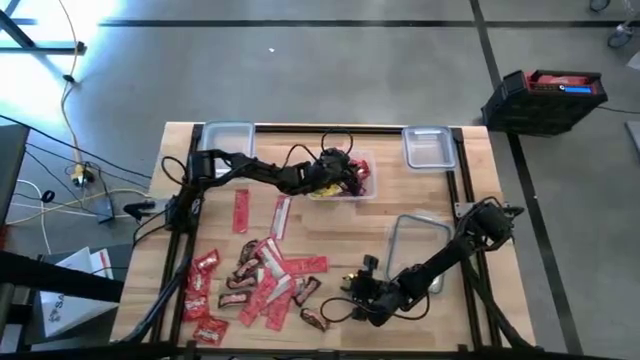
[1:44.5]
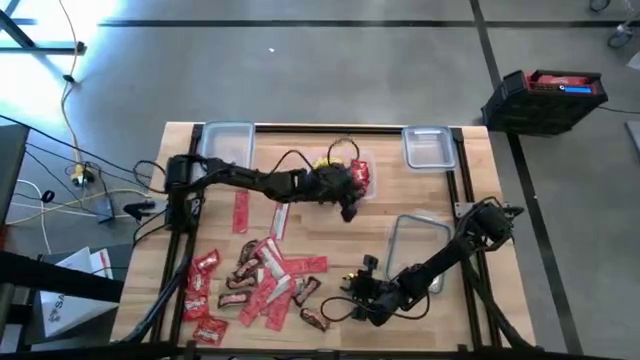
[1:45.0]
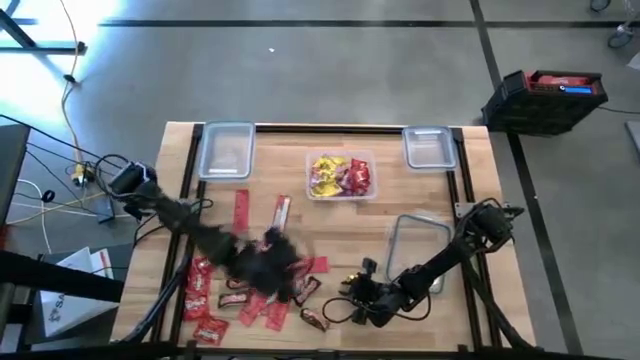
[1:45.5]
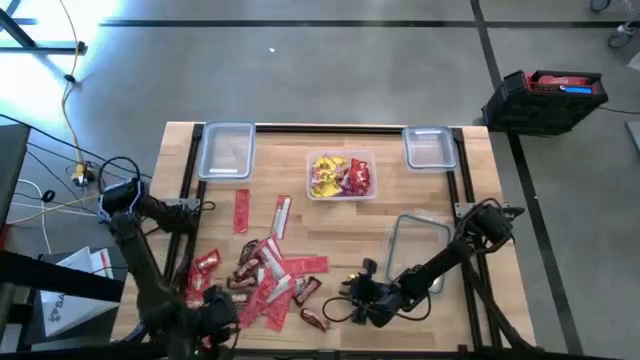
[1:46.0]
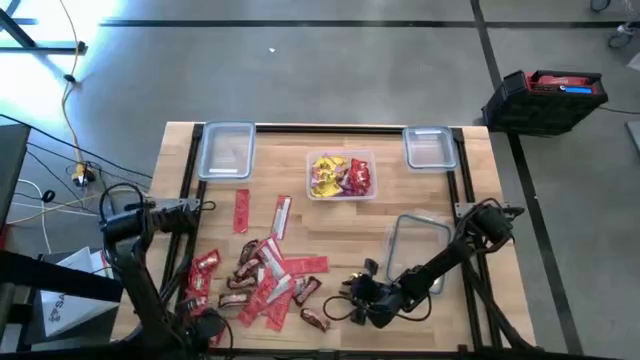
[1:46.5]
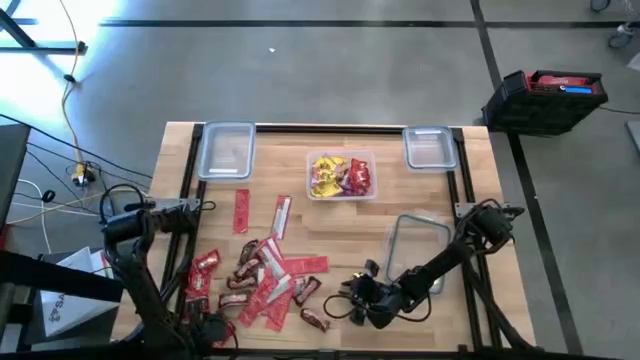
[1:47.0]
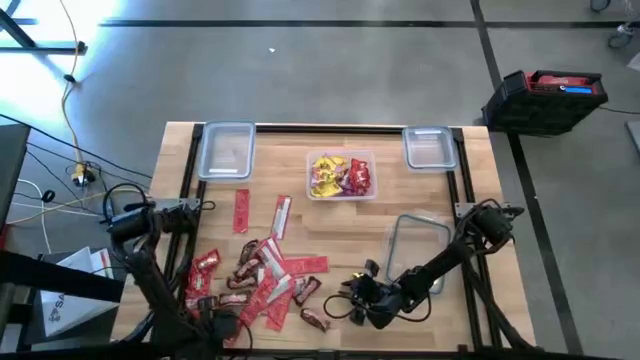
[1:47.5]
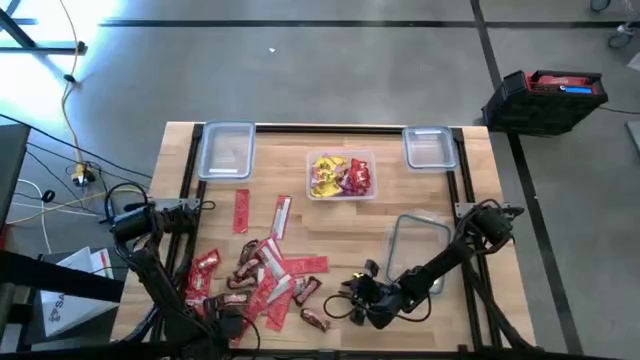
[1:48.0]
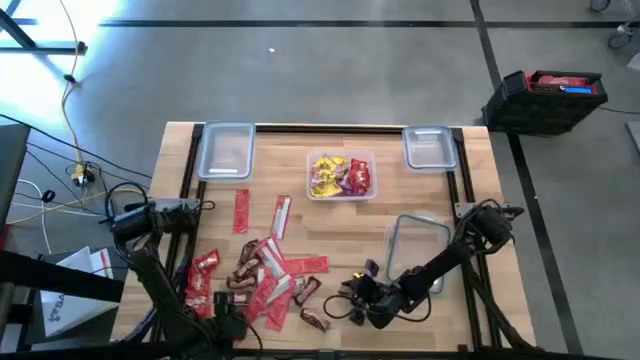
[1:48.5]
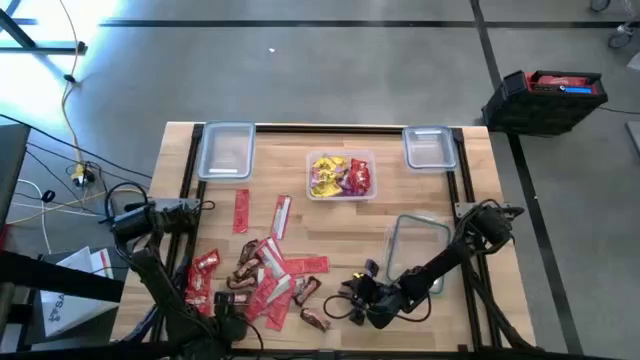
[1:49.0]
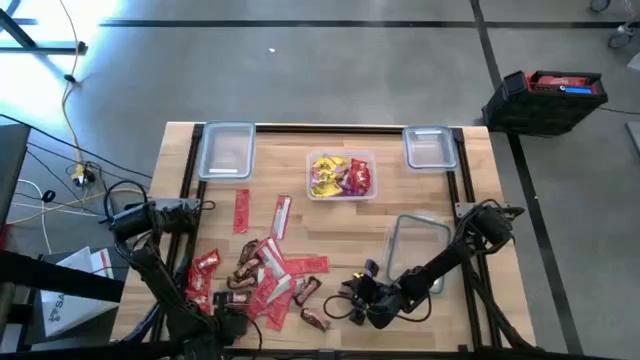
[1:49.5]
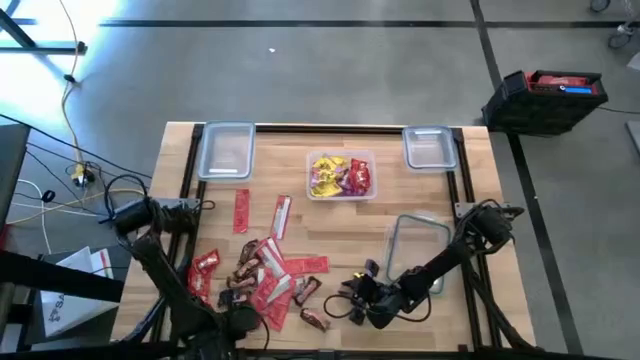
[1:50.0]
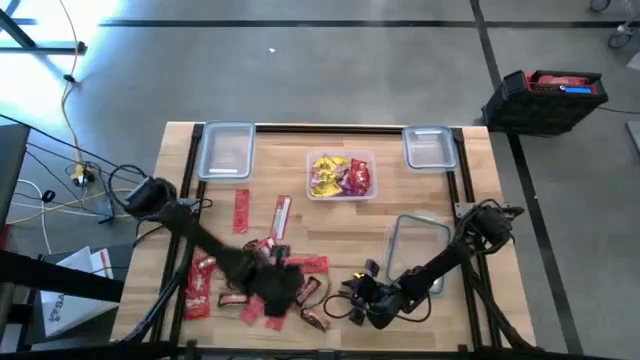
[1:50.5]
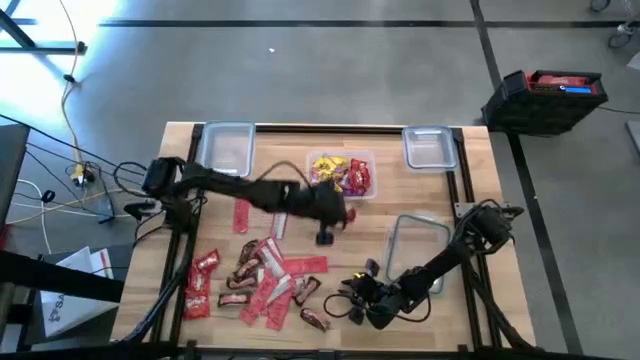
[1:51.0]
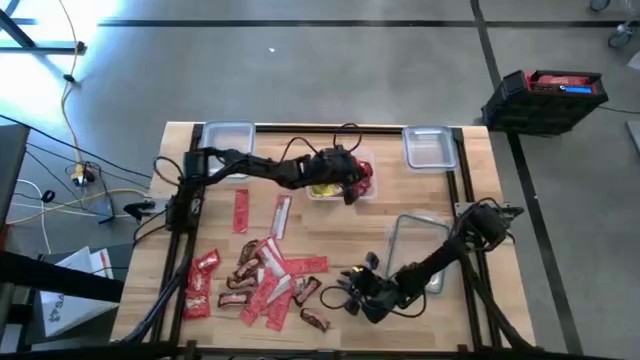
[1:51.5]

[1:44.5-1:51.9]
Task: Sort candy
Put the red candy into the center transparent bin

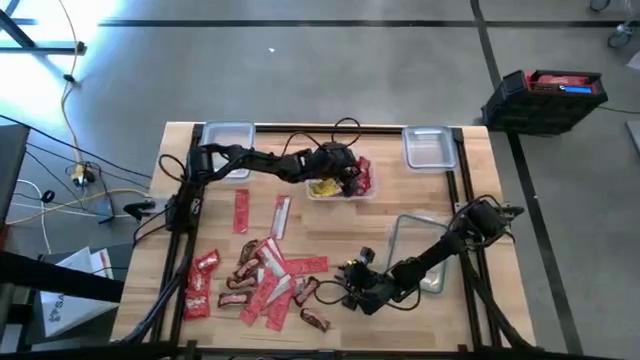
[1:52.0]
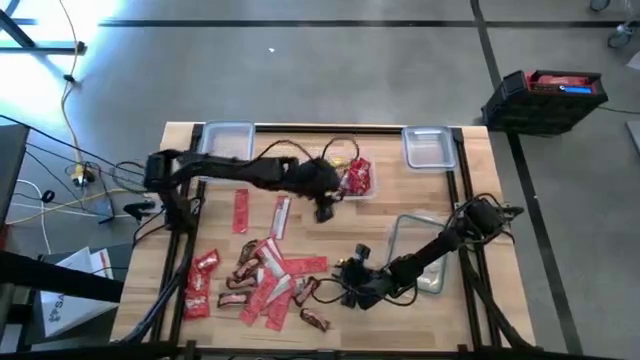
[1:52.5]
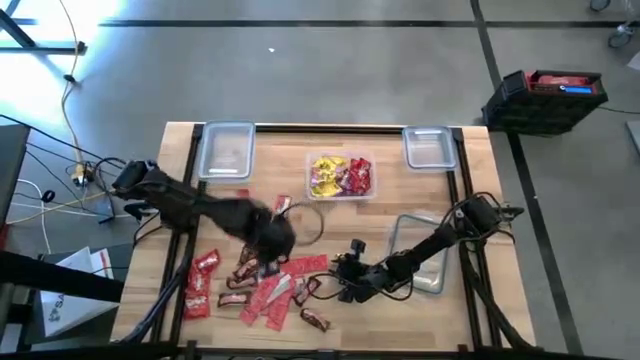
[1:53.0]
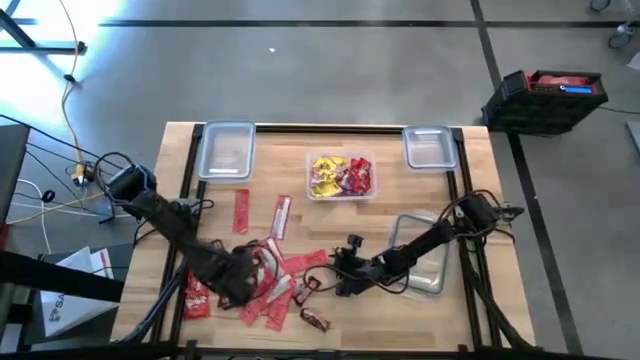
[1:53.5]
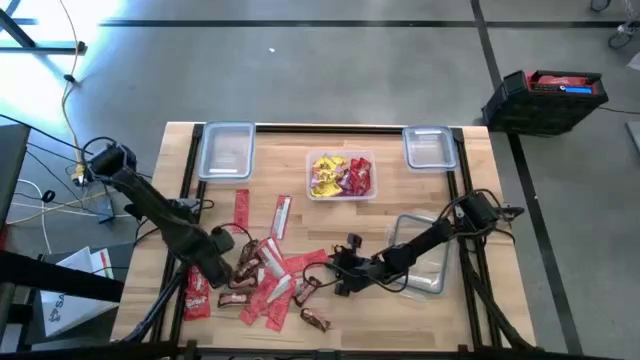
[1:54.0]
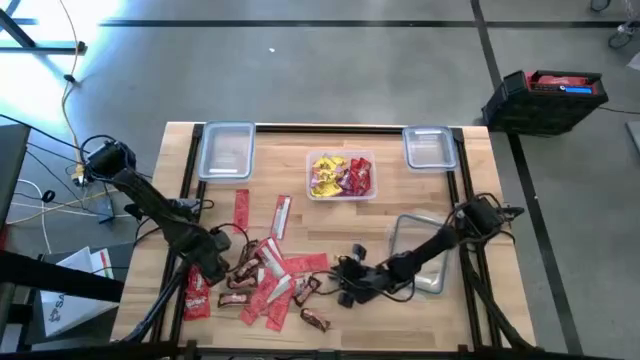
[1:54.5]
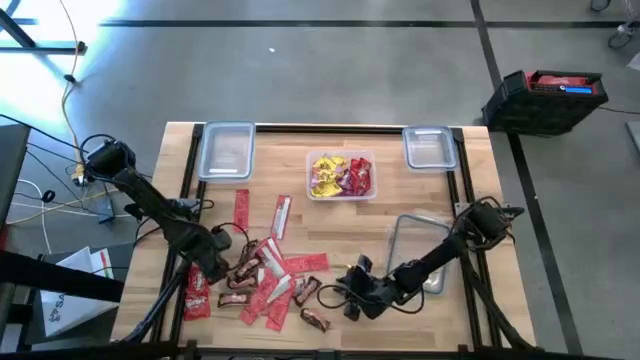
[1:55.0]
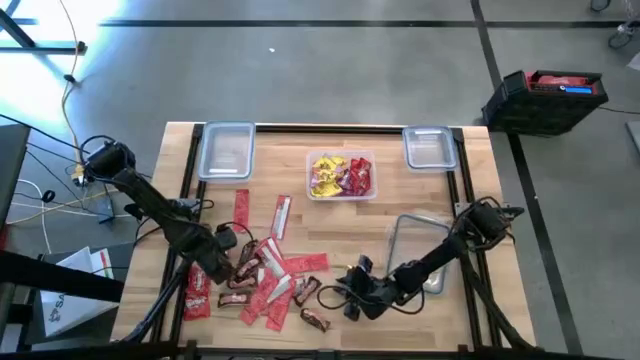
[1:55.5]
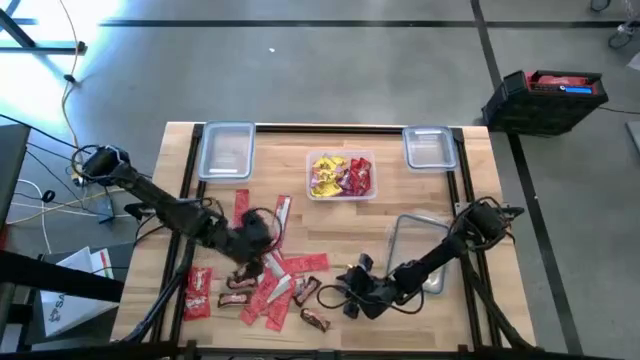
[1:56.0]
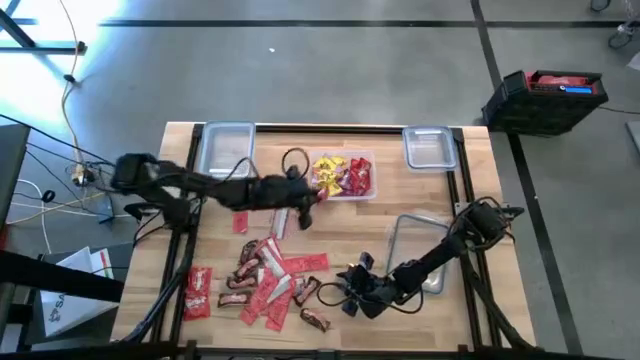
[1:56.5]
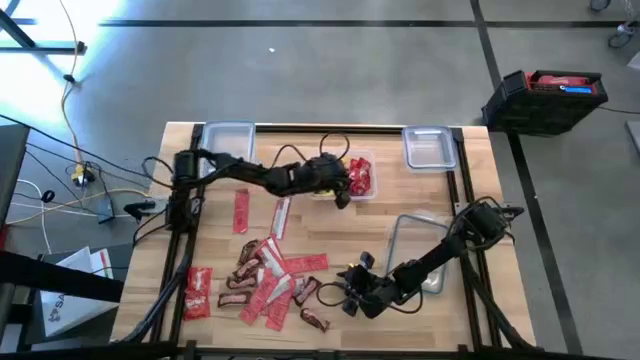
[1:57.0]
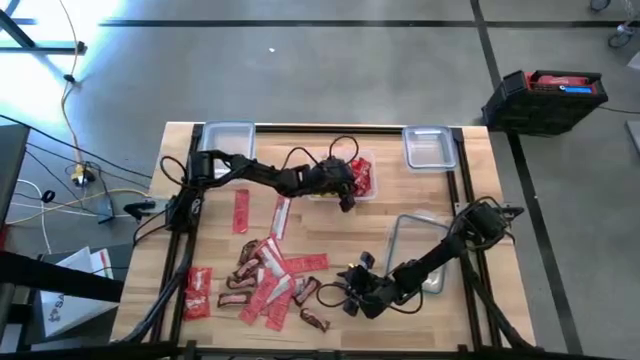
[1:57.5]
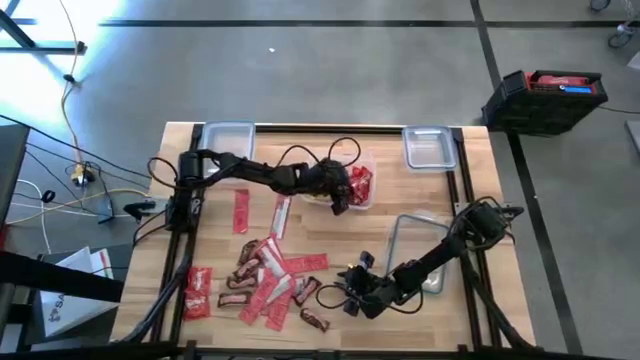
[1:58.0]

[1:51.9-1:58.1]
Put the red candy into the center transparent bin

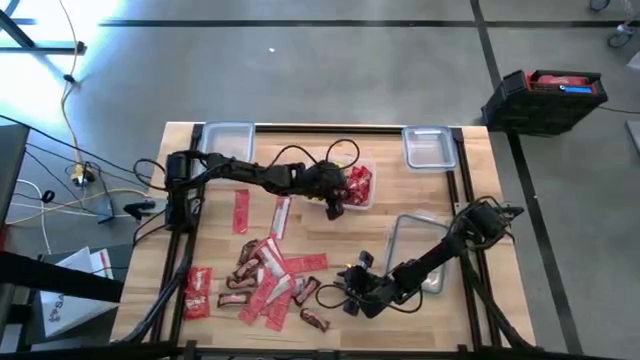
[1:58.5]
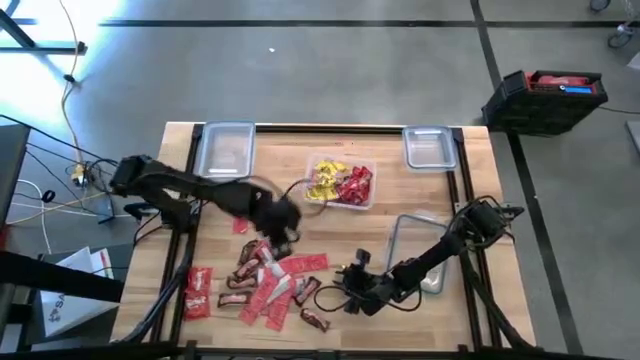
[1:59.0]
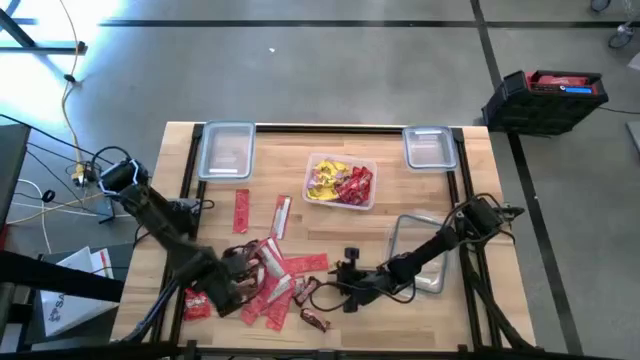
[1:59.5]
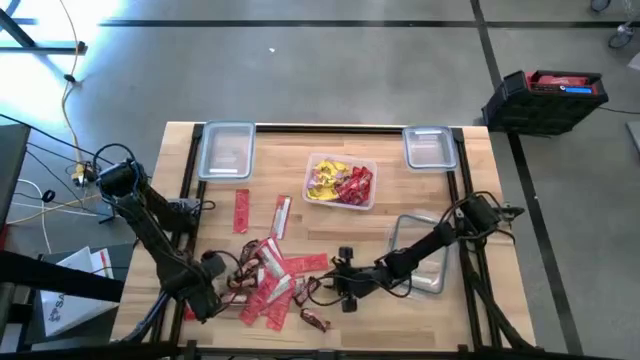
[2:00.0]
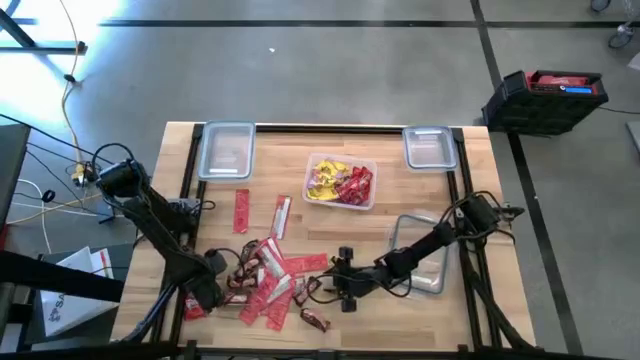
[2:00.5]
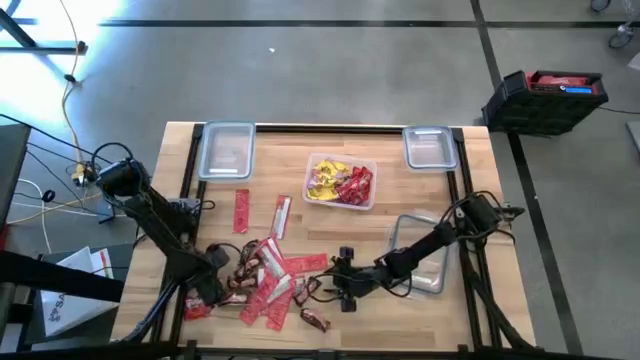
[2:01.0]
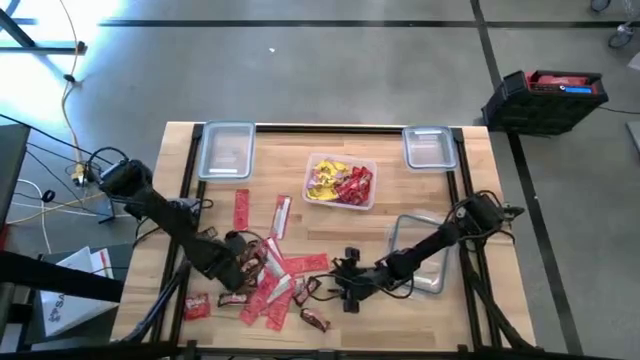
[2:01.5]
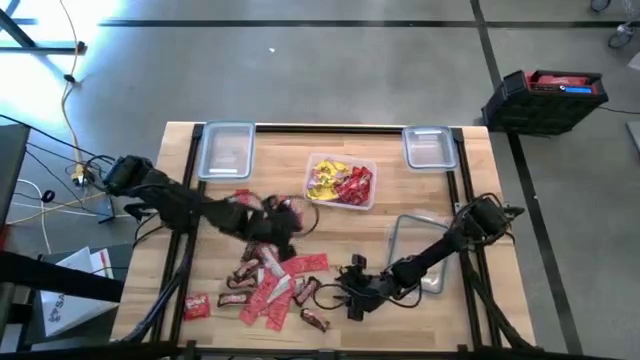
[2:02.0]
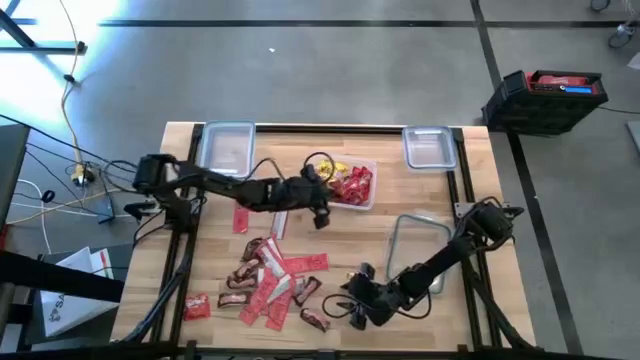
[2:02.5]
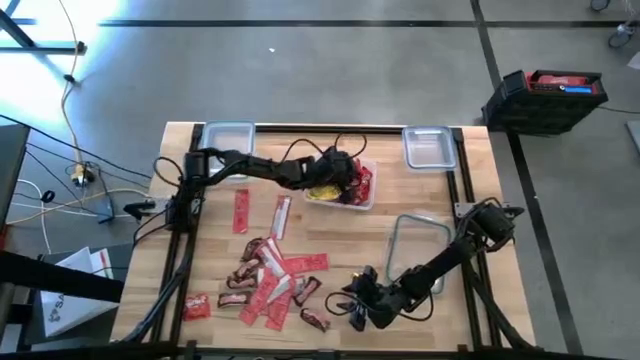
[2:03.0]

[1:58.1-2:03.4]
Put the red candy into the center transparent bin

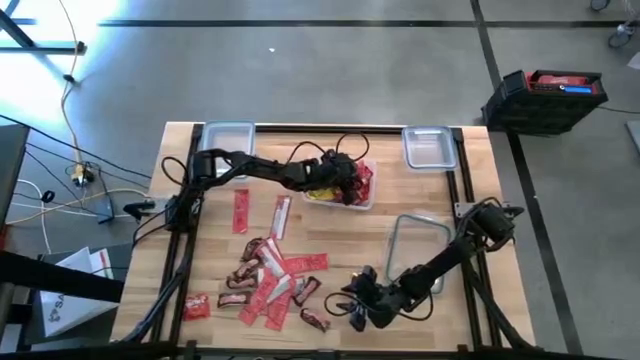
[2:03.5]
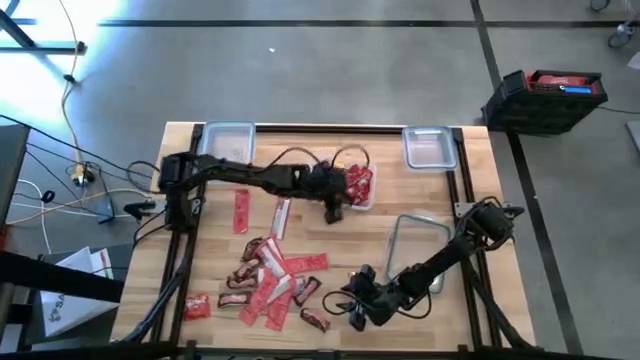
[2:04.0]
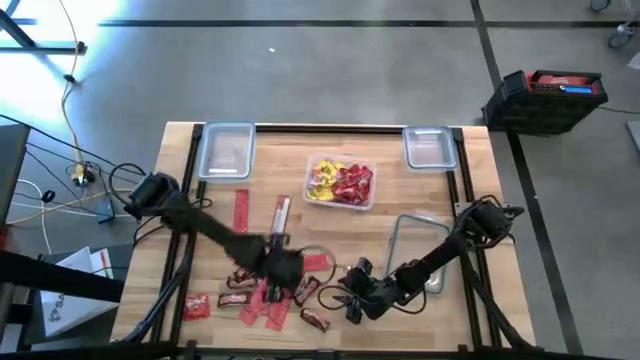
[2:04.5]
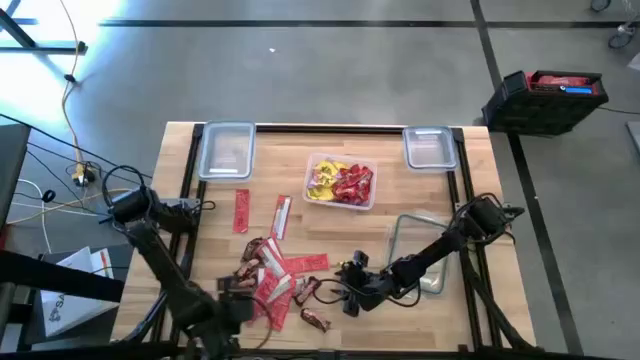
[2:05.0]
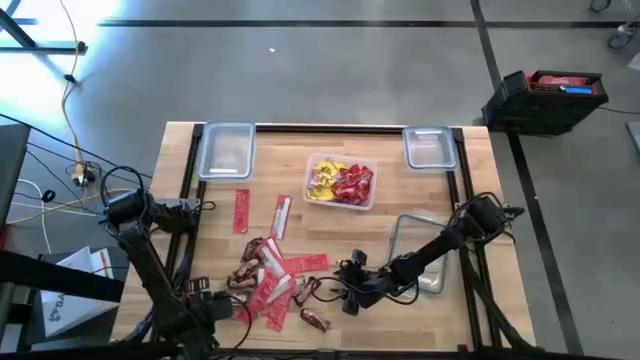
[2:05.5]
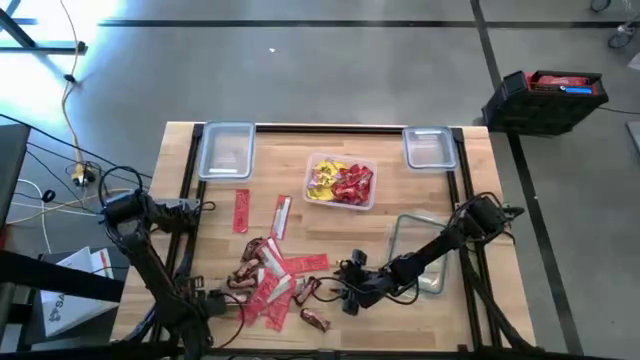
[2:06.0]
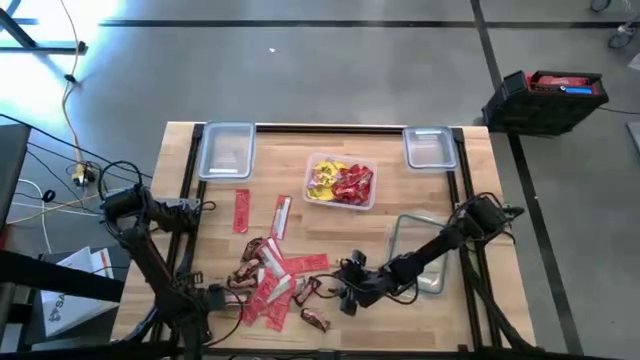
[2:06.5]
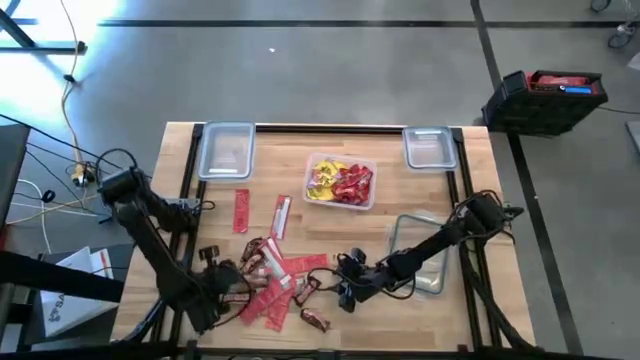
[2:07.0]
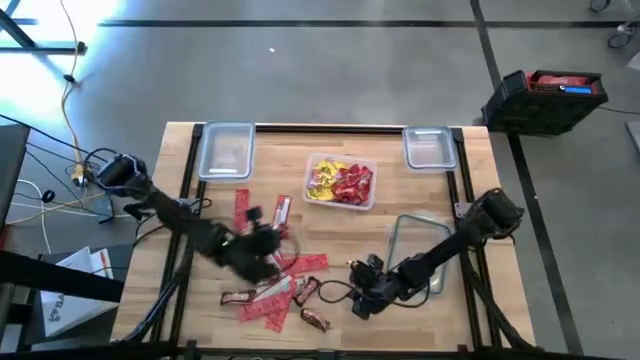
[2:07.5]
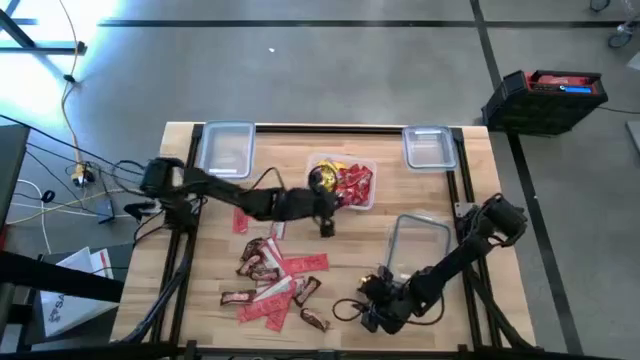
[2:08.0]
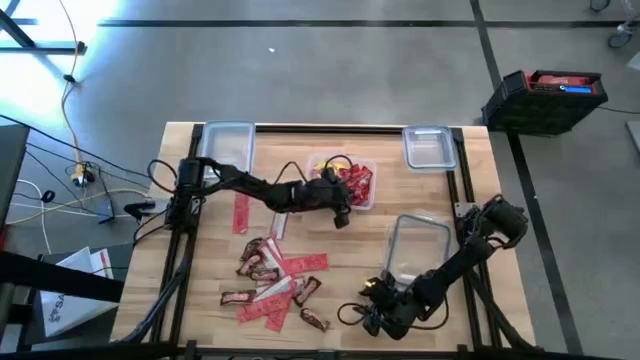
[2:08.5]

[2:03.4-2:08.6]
Put the red candy into the center transparent bin
